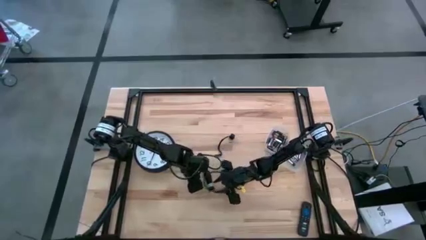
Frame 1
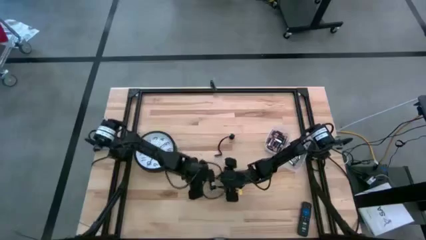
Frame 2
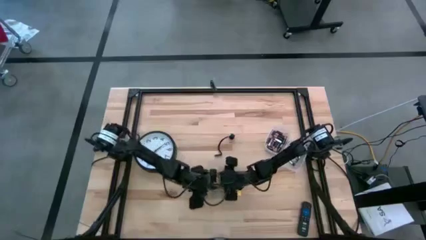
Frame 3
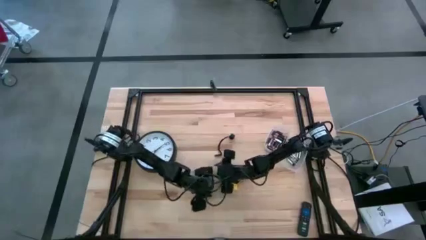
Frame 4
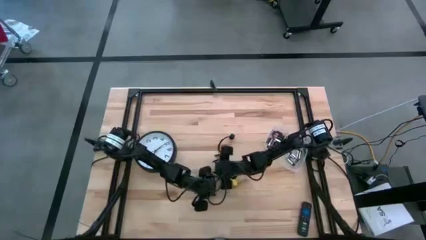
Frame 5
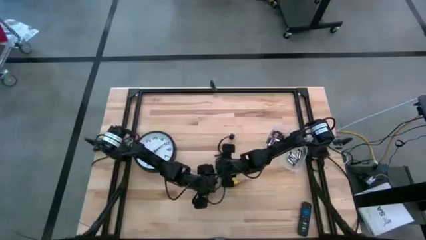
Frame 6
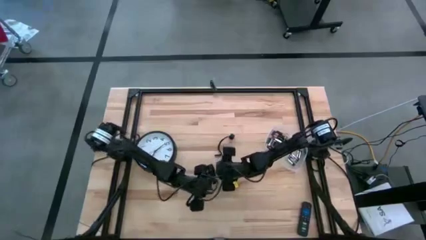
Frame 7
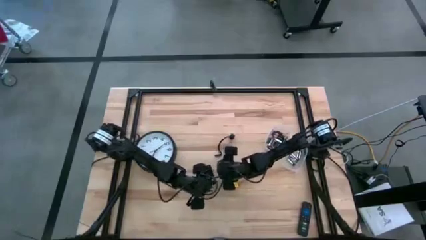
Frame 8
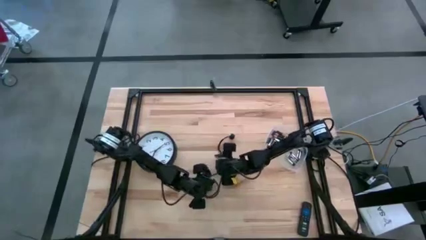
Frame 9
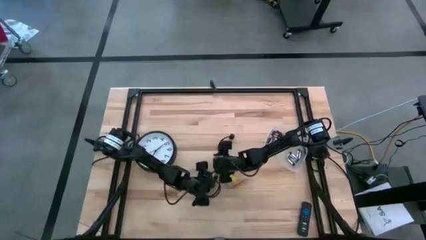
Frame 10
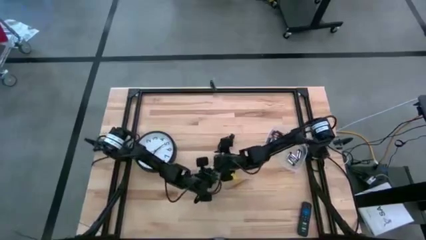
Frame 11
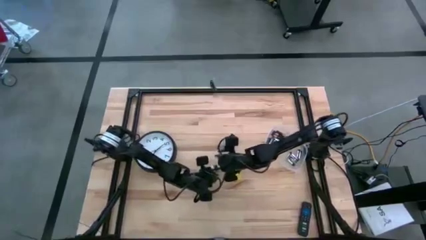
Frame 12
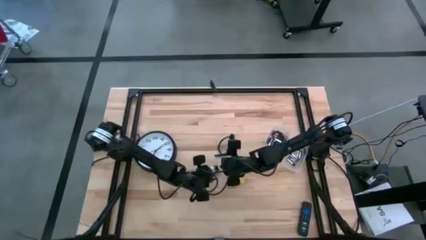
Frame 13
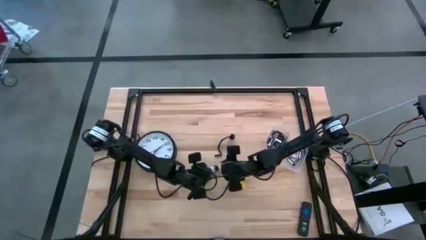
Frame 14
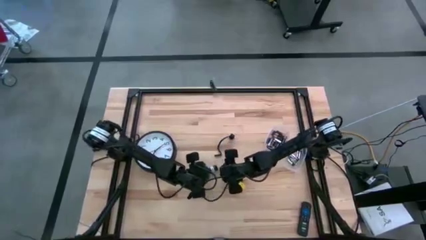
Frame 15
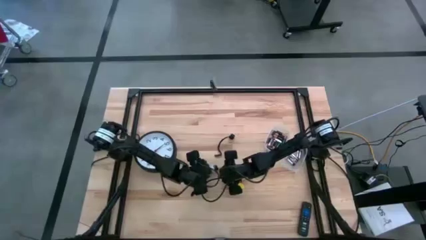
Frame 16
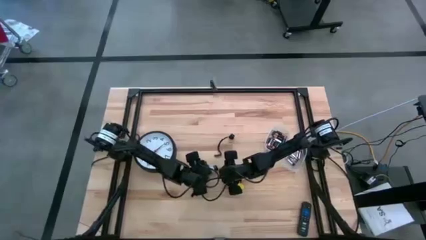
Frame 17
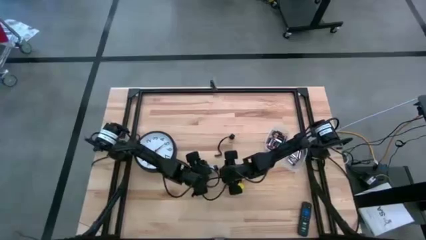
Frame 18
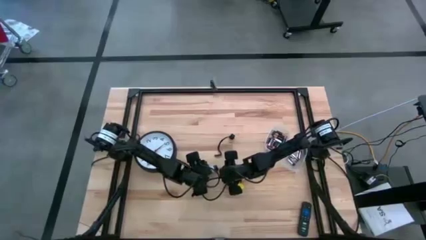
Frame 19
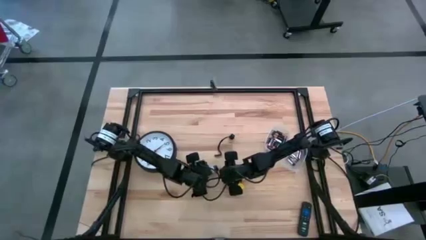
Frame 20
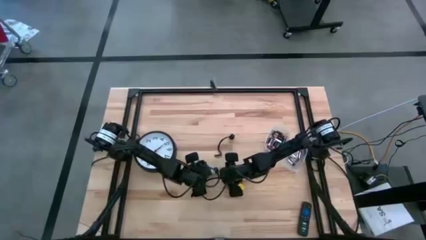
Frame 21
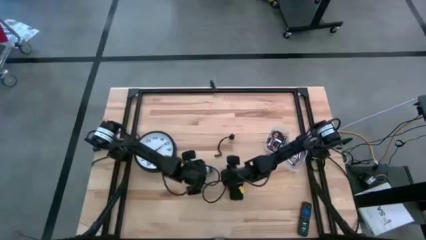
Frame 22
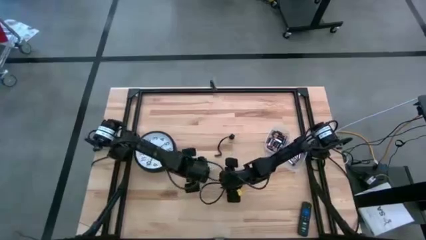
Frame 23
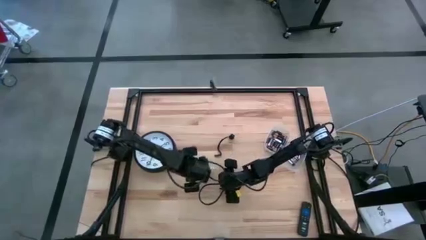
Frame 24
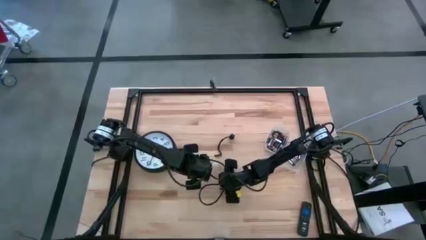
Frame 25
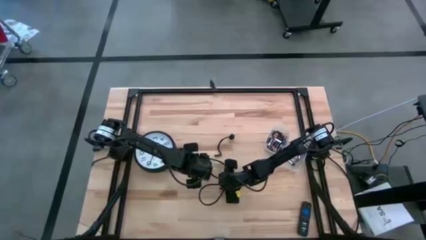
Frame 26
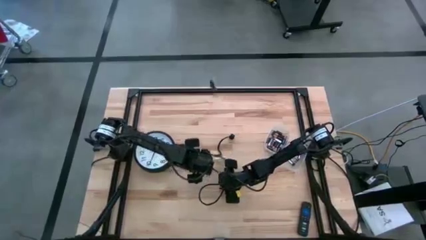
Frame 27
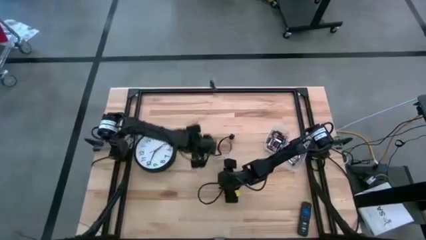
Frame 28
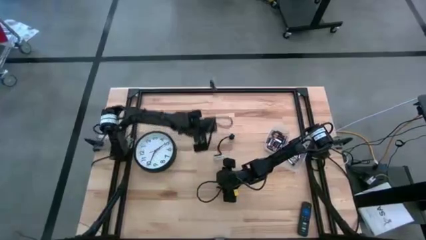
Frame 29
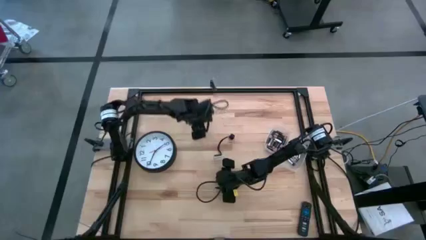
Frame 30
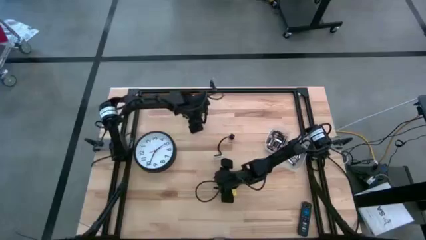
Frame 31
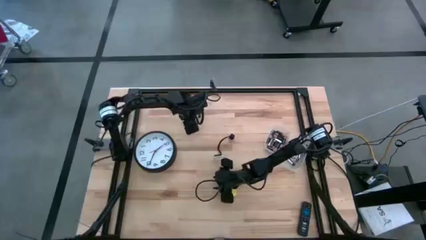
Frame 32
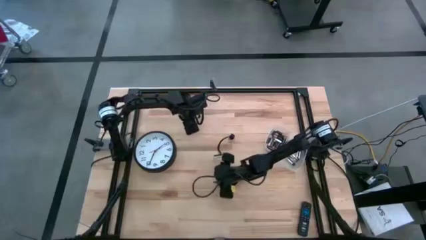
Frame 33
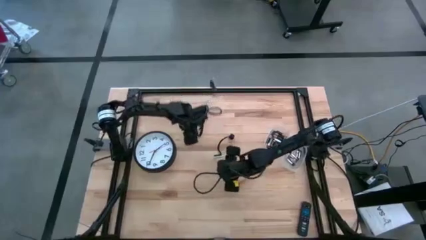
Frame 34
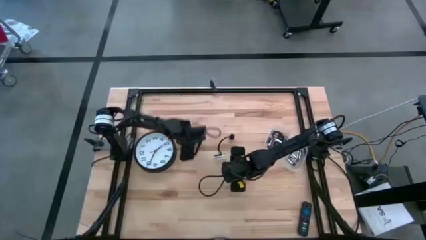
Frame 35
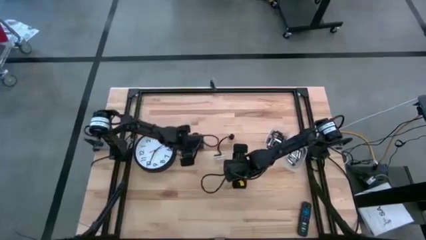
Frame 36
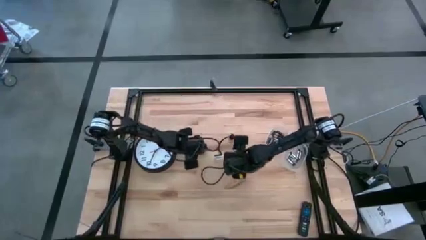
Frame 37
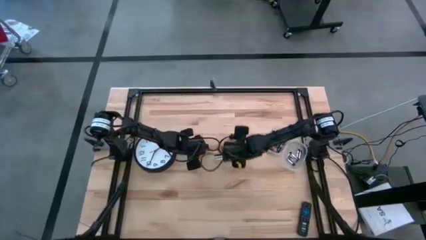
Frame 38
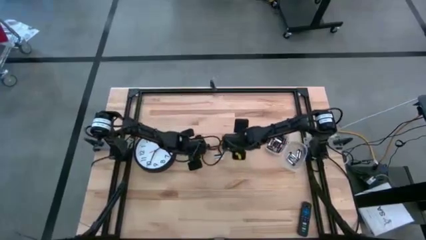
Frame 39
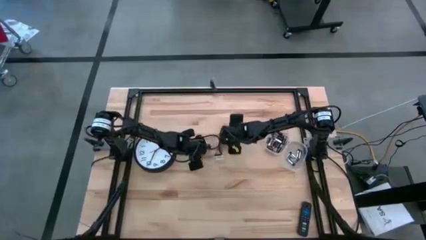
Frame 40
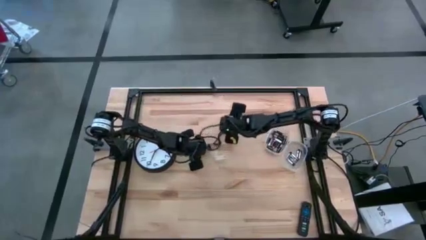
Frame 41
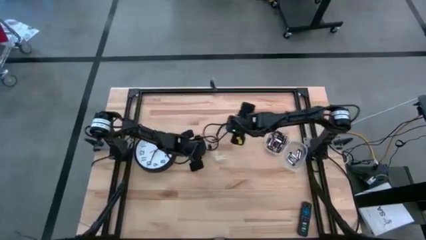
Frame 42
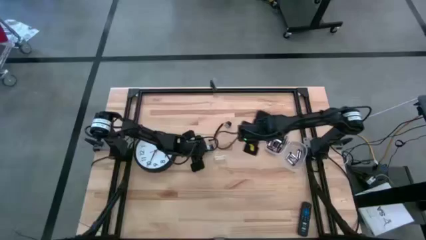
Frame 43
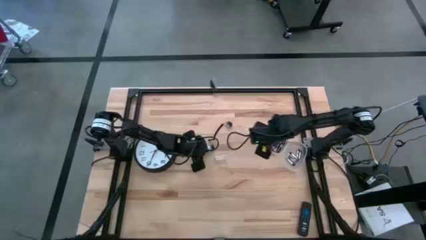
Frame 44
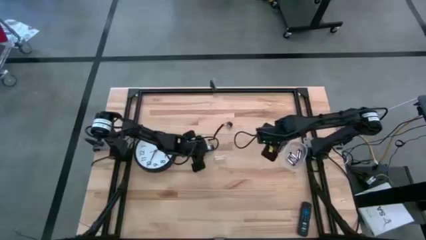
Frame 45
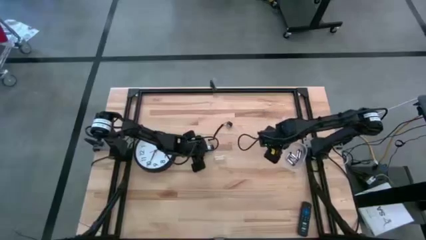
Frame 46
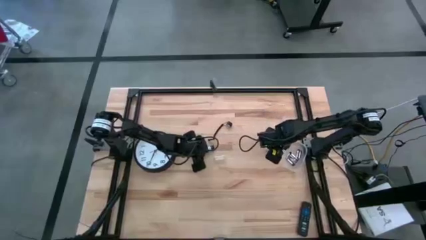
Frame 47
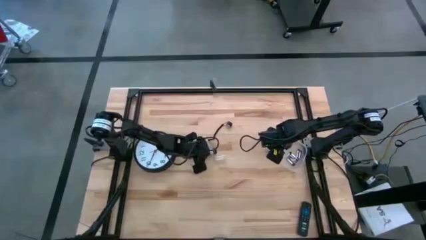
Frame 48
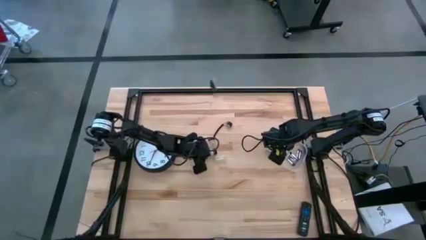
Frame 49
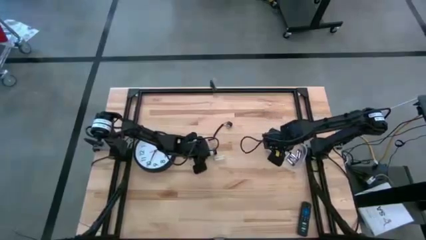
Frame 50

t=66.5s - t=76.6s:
Task: Insert battery
Remove the white battery holder

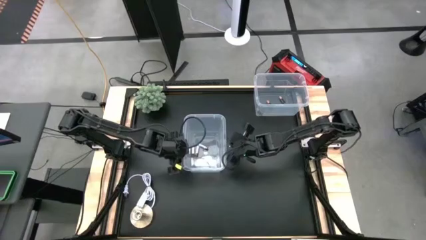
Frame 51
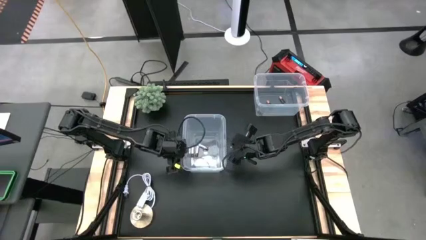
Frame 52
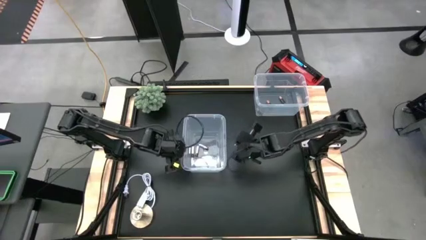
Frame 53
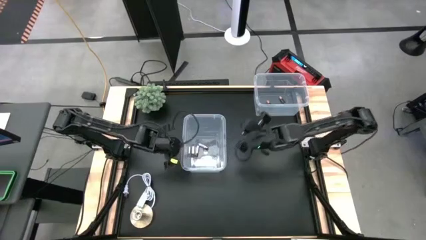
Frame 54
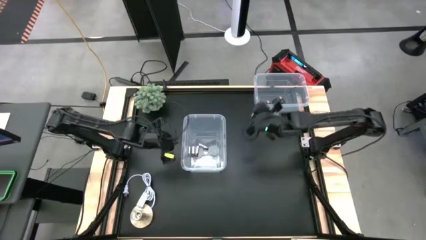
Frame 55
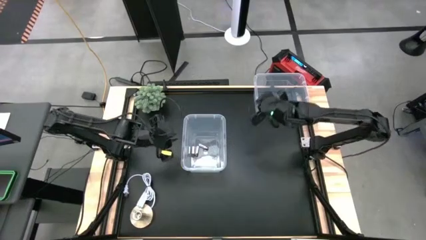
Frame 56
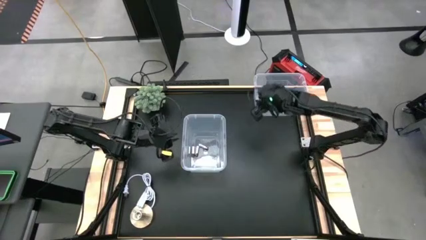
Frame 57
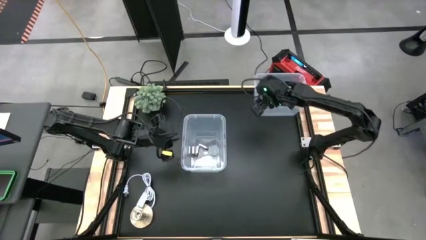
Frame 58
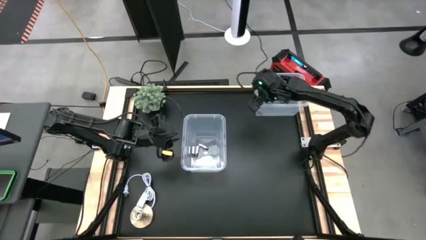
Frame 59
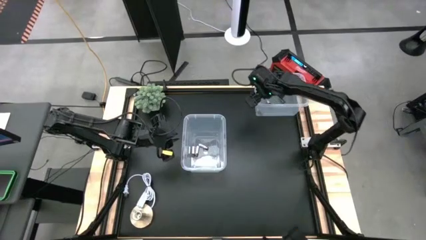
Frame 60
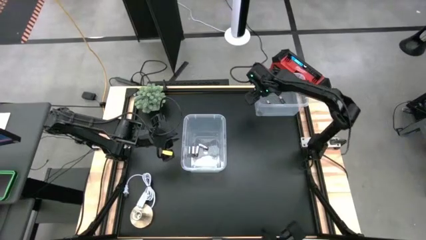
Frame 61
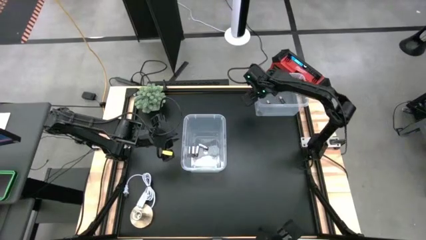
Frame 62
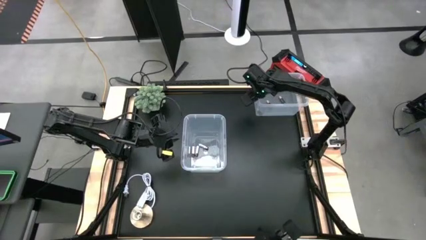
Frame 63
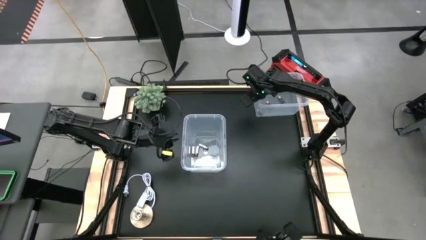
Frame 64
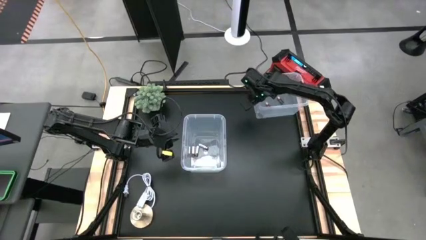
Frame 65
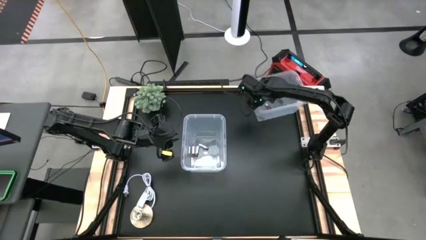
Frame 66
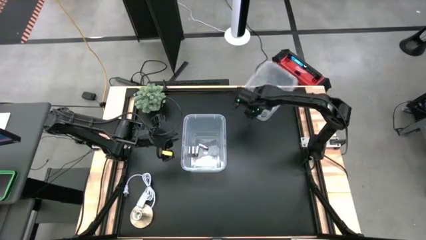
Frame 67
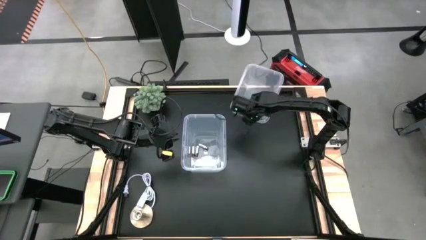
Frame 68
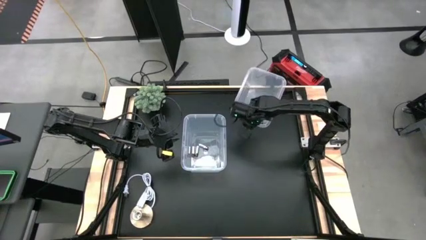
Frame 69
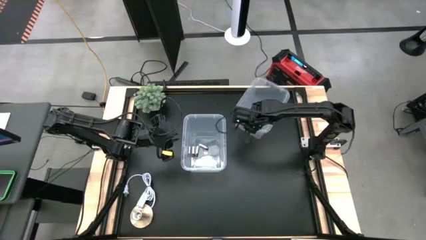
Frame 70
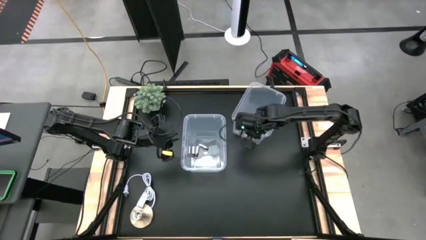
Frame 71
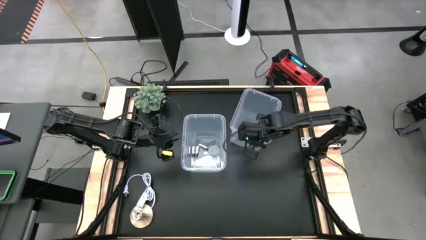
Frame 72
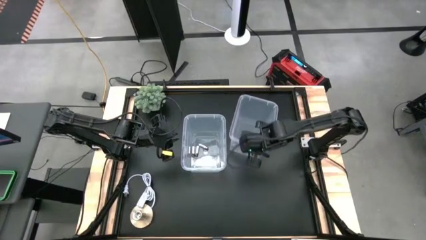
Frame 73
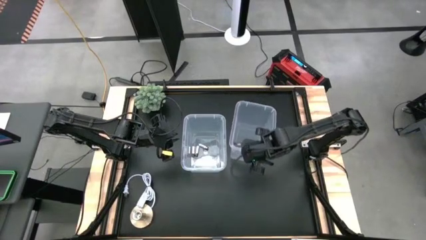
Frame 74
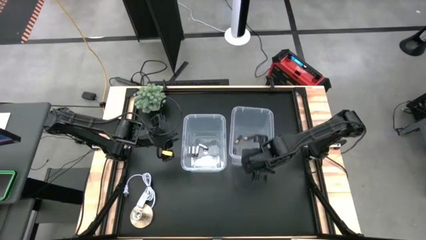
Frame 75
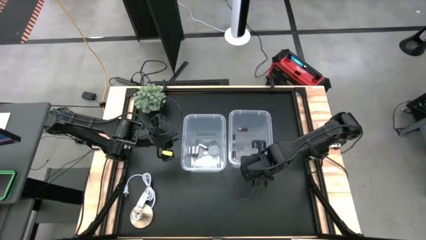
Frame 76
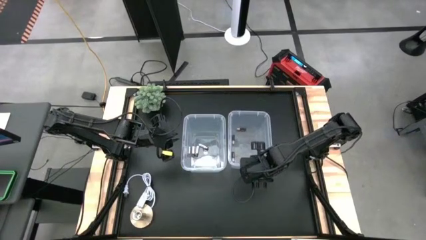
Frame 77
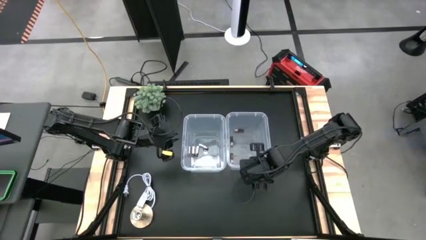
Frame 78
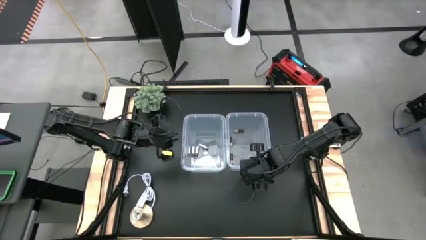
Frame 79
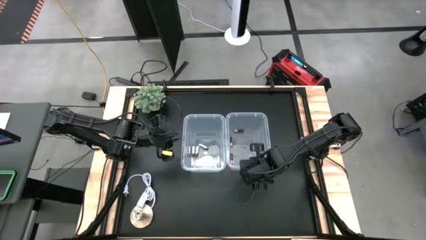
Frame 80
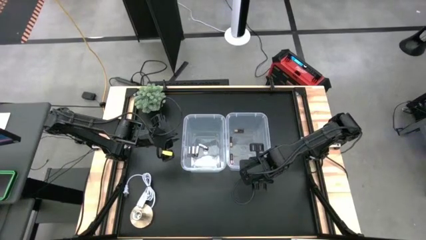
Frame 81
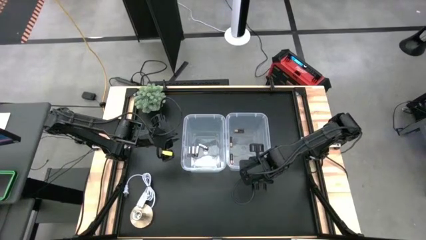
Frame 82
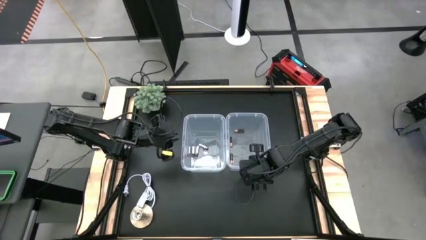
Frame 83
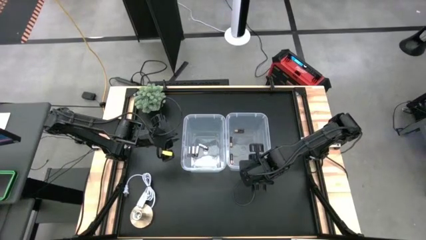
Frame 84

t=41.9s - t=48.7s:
Task: Sort batteries
Move the top transparent bin on the right side of the bottom transparent bin
